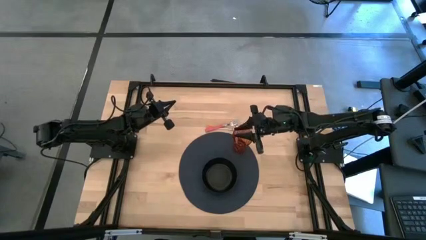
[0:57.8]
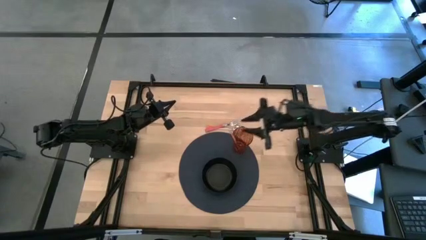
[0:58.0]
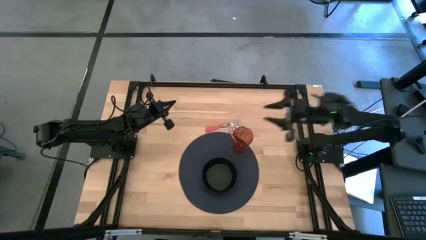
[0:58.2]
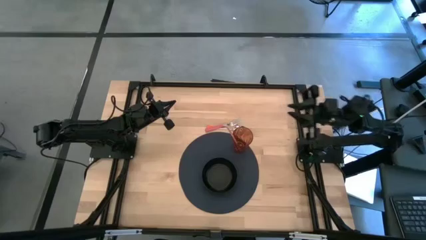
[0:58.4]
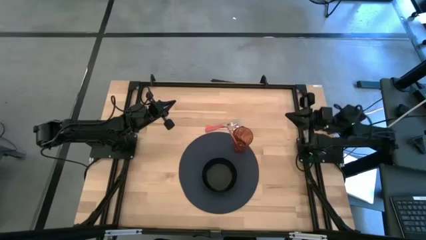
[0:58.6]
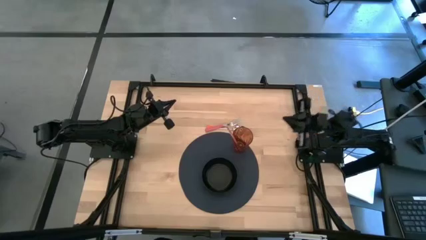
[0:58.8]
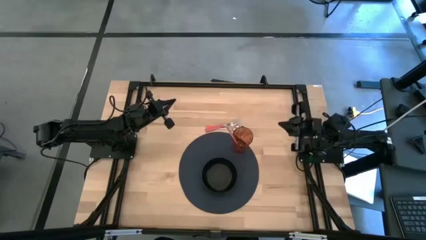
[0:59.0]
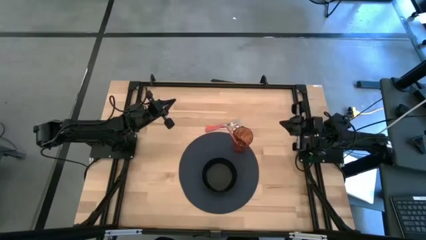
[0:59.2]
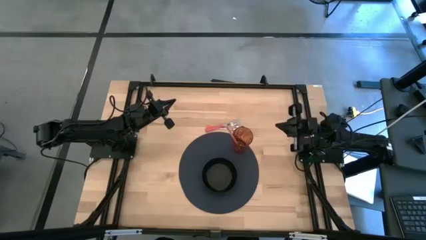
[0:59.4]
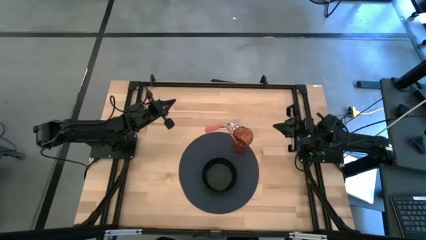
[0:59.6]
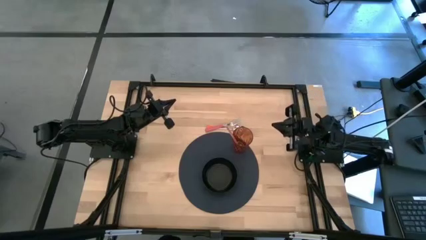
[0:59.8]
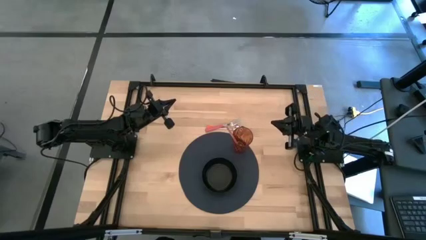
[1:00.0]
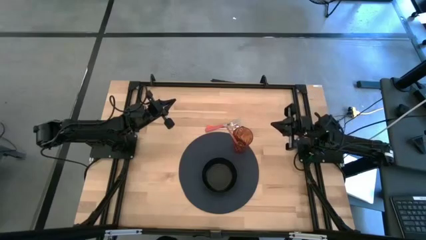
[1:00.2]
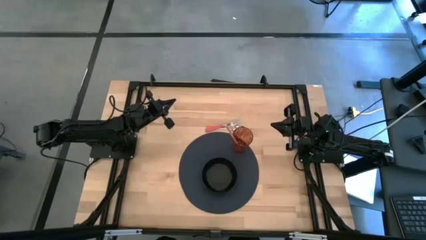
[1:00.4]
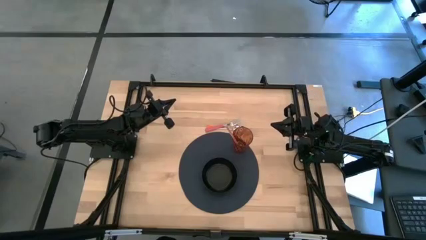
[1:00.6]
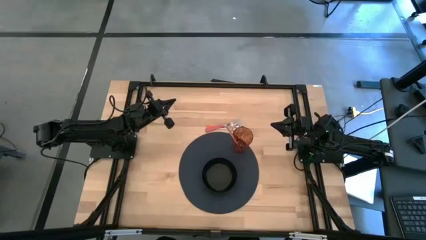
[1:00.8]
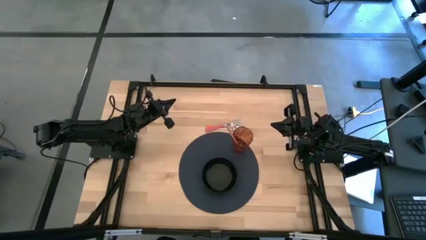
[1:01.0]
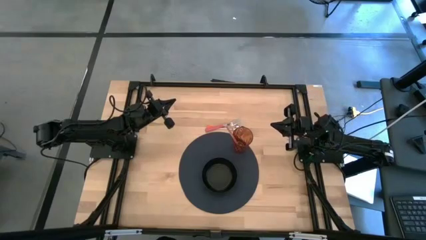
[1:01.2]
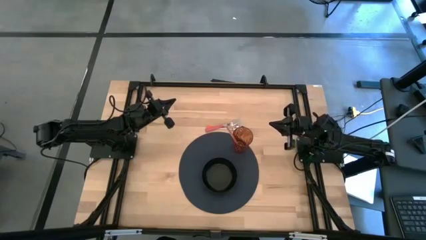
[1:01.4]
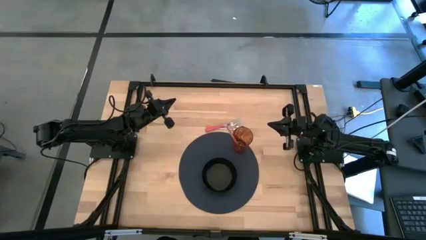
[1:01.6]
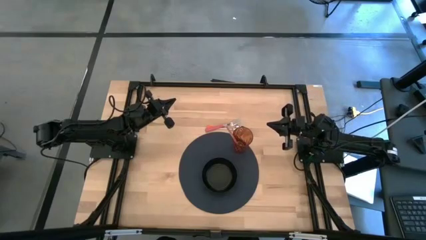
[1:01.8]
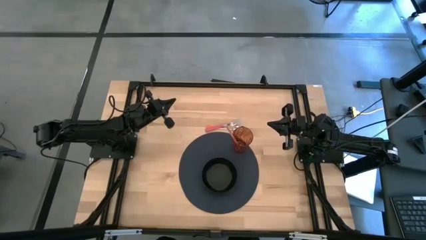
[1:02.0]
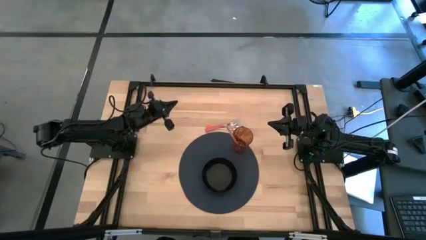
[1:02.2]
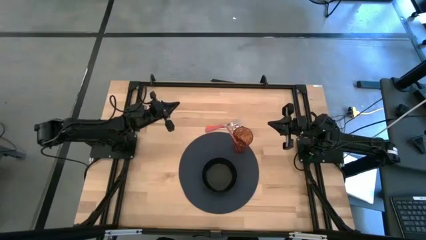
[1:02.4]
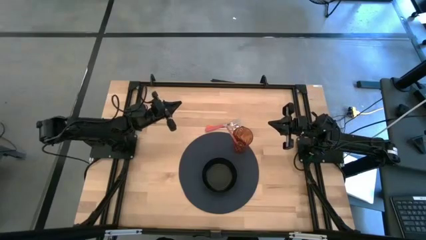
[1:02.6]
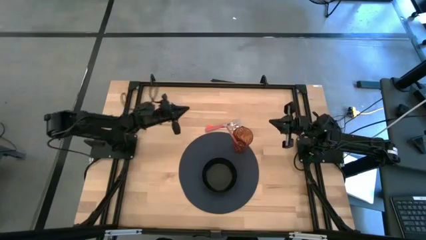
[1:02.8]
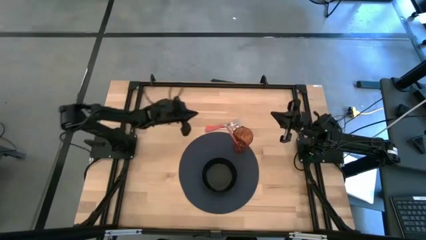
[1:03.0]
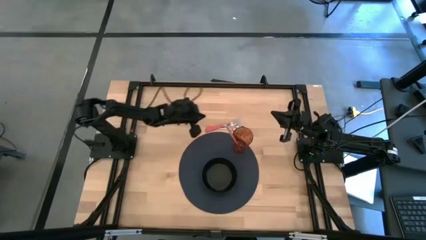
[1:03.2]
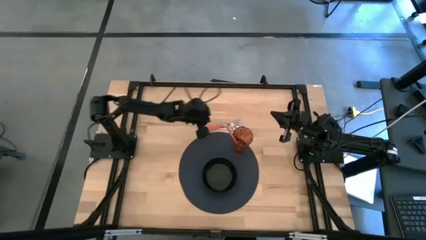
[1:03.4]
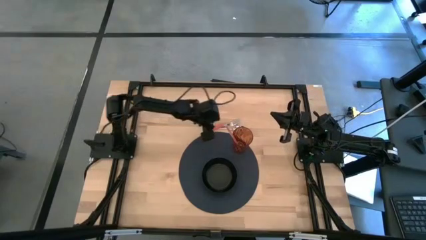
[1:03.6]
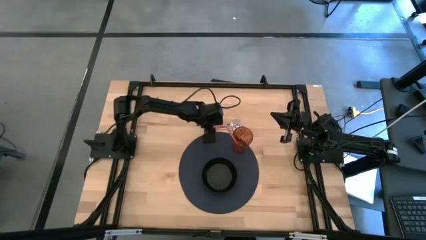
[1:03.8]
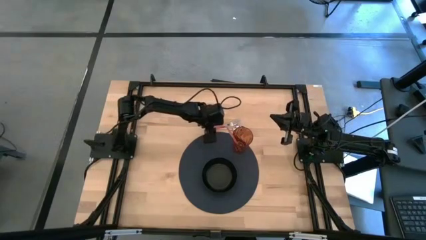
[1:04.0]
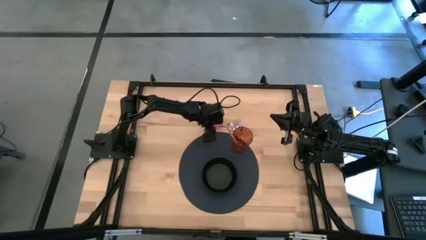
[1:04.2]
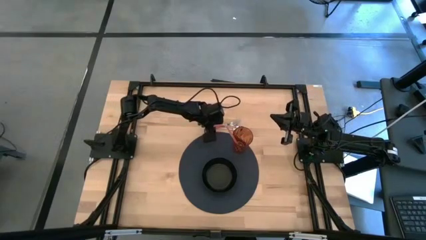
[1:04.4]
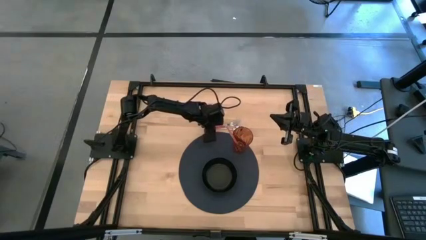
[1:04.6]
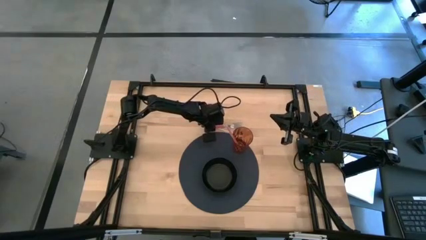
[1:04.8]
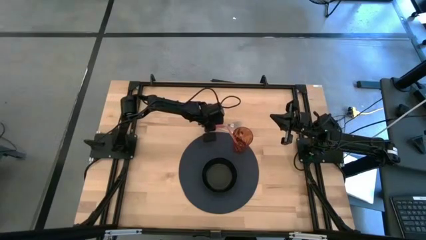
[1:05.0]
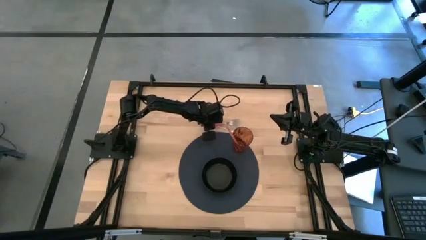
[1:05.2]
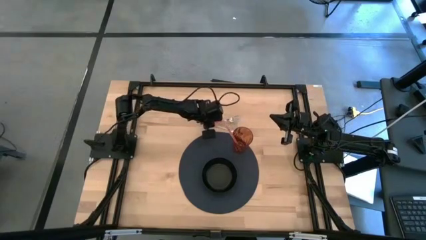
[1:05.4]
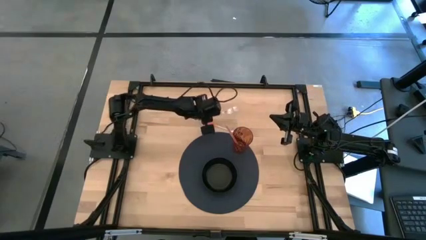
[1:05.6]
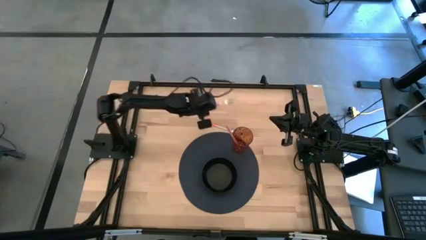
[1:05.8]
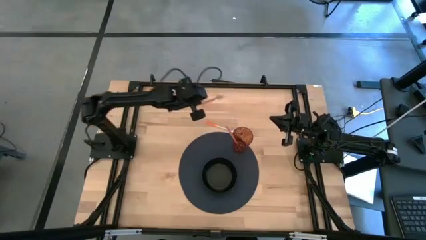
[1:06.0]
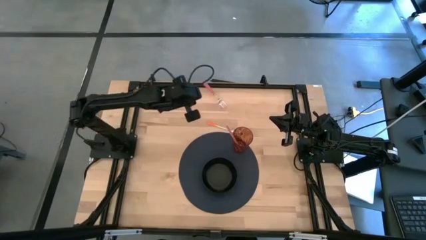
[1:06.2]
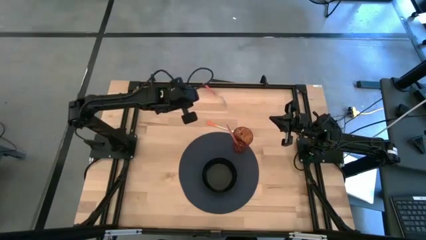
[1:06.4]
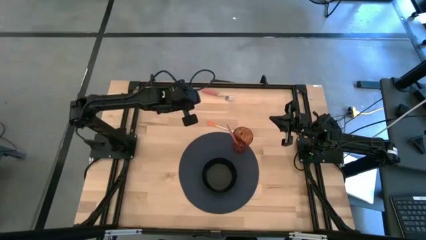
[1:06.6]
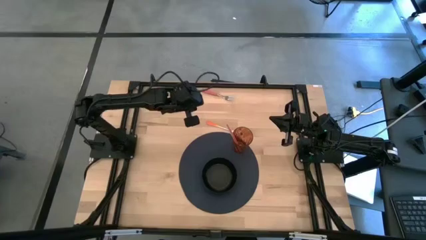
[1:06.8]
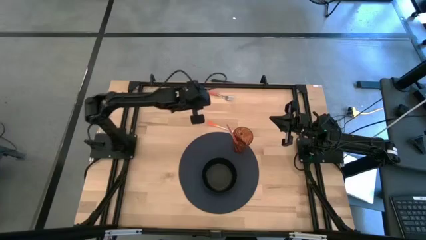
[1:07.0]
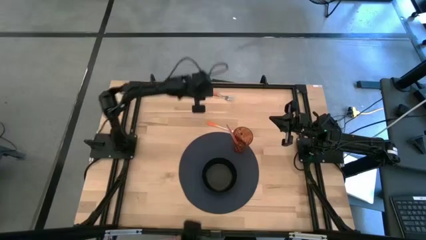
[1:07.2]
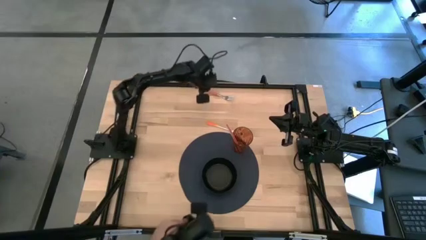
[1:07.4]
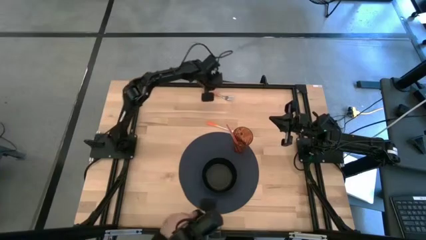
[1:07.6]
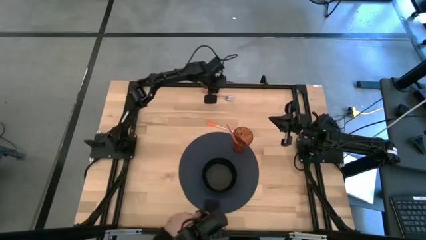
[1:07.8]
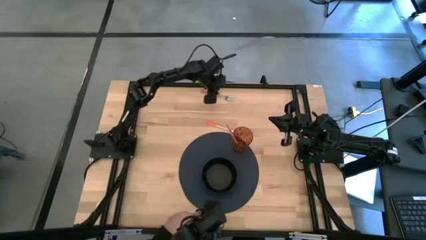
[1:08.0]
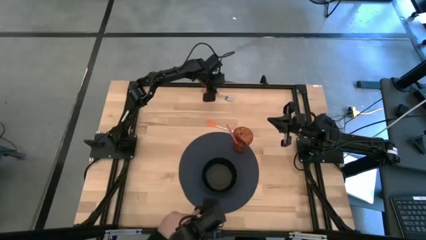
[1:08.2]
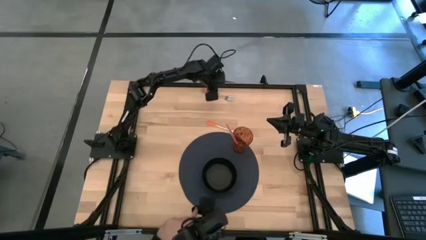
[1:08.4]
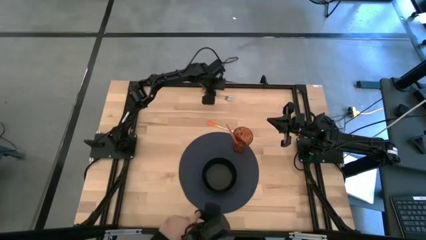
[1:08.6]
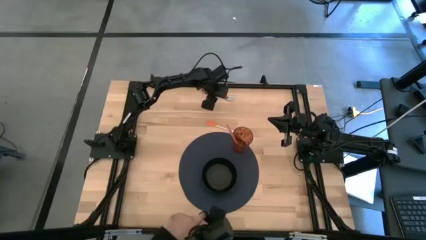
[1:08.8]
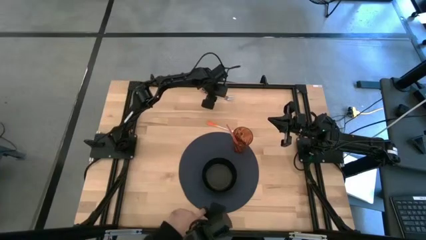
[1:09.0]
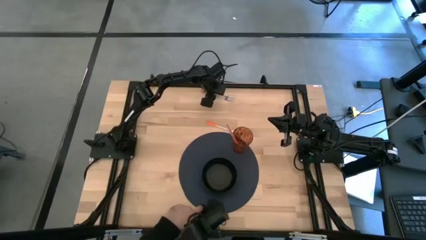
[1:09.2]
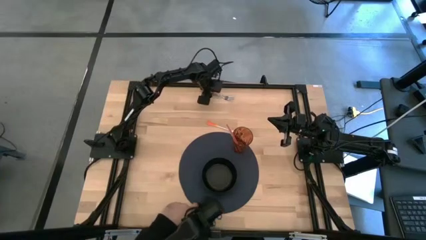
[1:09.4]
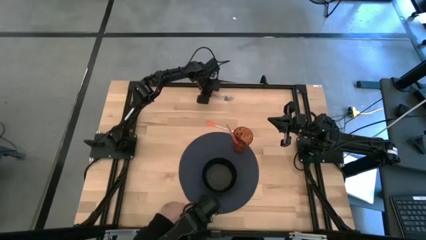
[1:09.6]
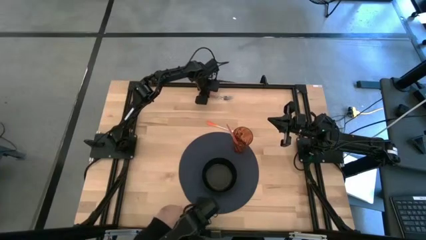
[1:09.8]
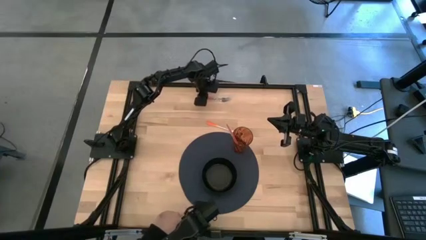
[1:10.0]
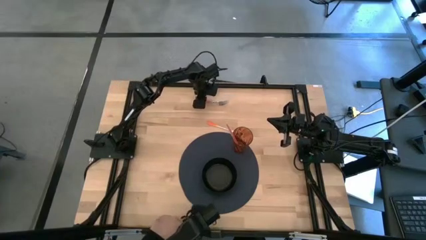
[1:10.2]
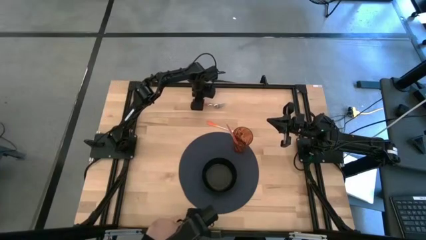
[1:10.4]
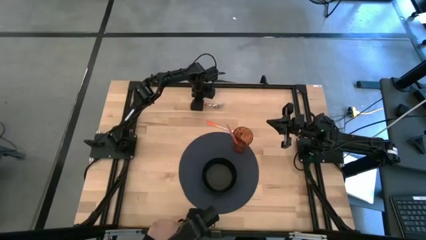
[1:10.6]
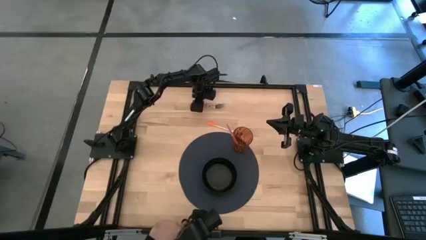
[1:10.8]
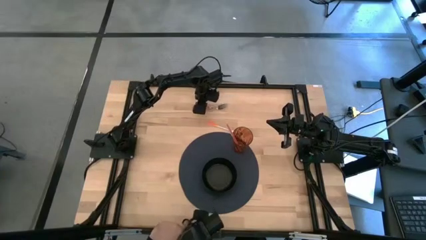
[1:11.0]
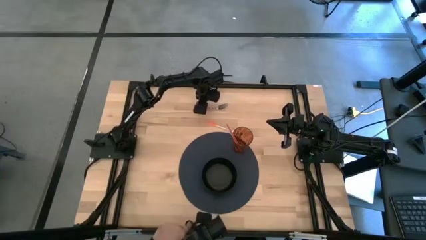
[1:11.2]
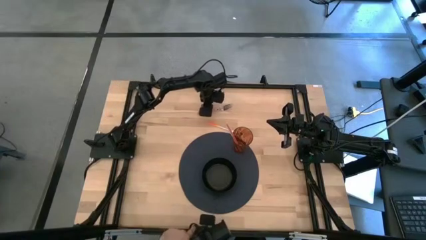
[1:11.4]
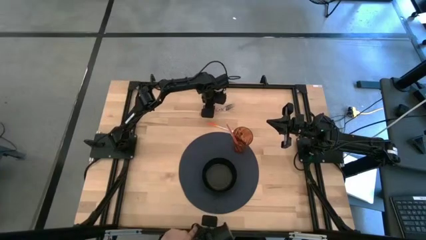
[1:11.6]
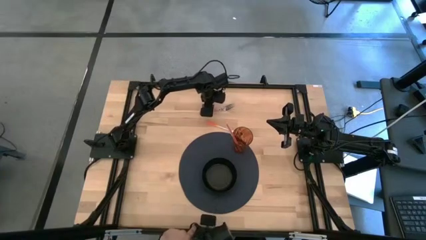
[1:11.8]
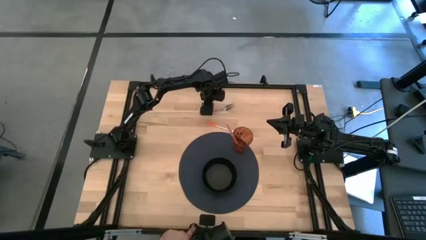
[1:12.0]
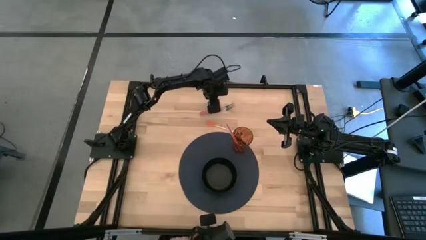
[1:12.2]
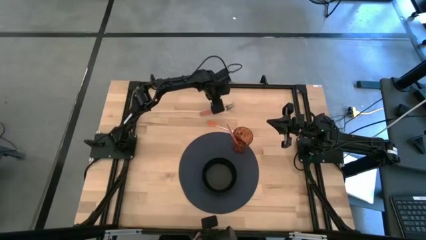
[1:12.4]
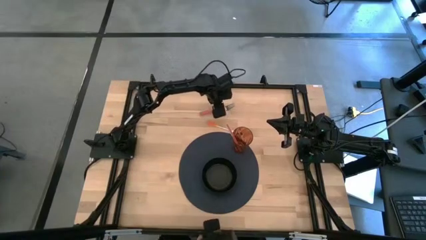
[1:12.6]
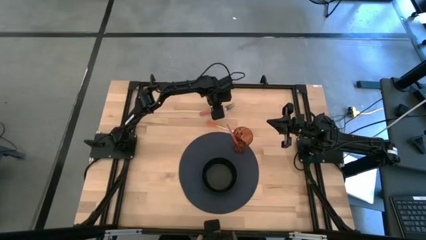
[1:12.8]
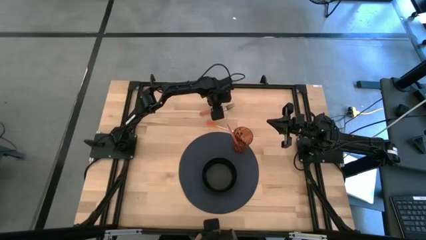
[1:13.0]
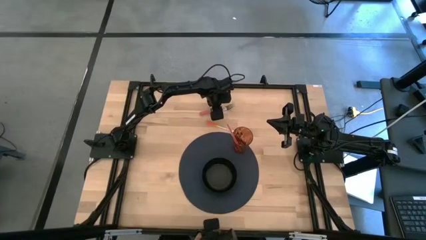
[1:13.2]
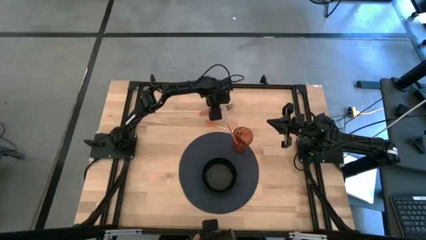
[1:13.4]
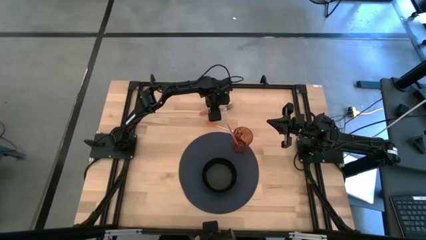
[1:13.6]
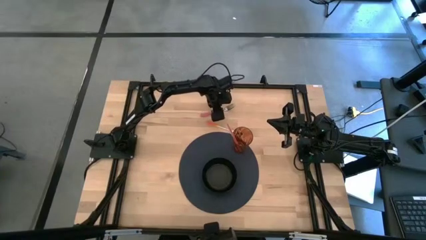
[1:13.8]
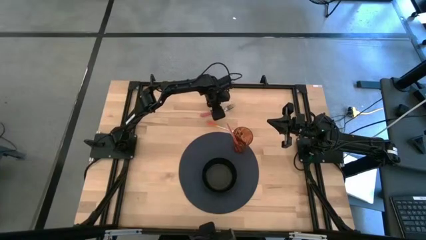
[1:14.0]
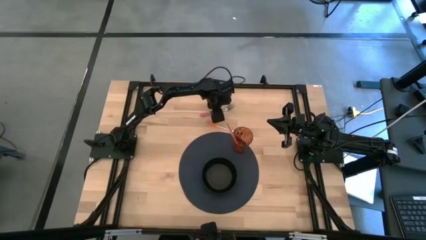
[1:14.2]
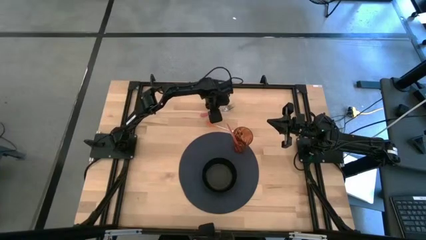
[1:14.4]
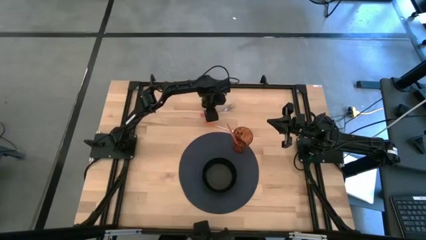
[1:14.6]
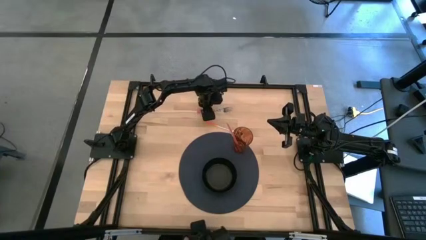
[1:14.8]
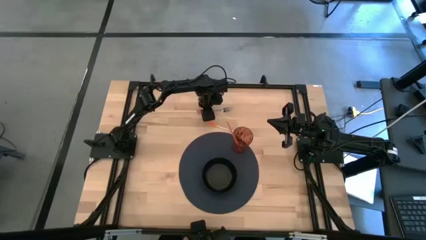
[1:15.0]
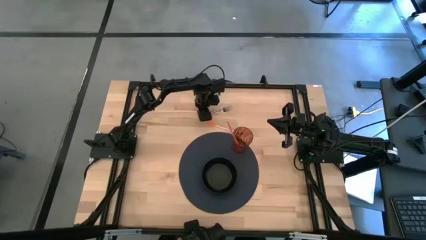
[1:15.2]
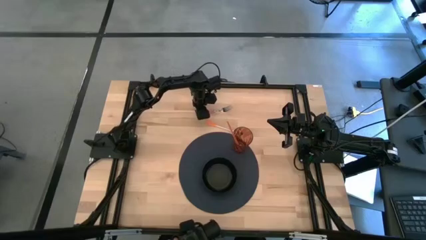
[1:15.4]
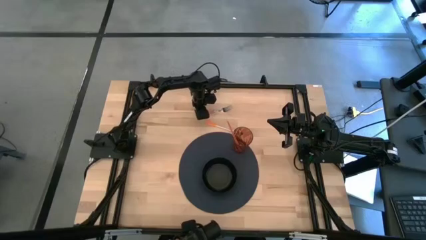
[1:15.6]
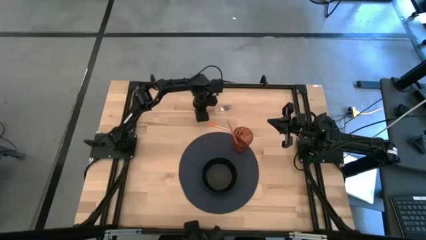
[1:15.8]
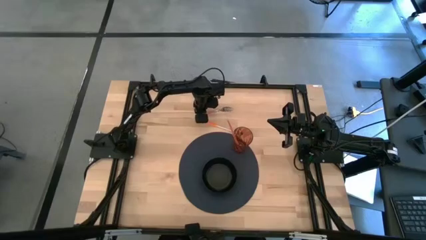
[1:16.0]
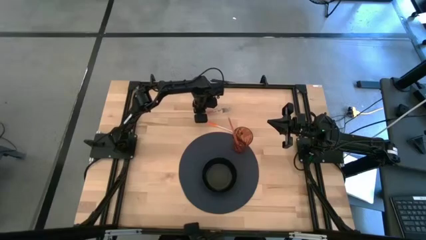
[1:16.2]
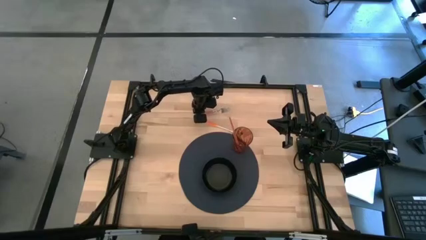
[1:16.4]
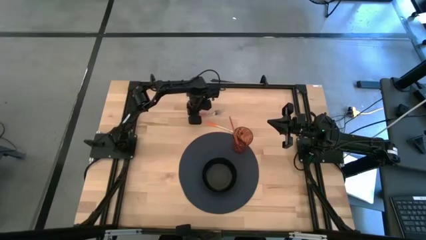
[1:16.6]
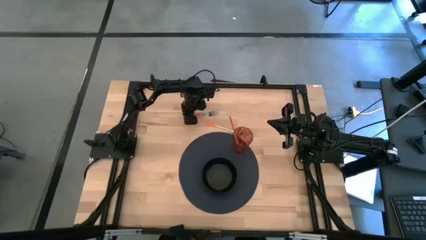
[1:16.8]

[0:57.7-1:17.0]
Task: Pick & Place Utensil
Put the pink fork into the black bowl on the blue mat
